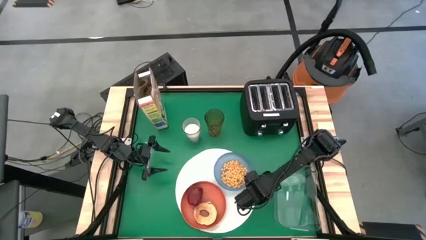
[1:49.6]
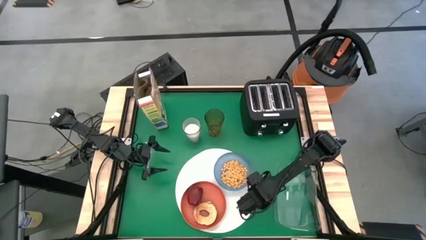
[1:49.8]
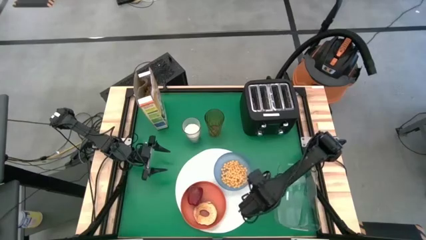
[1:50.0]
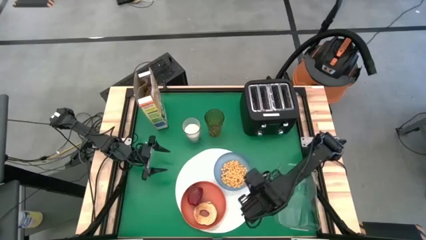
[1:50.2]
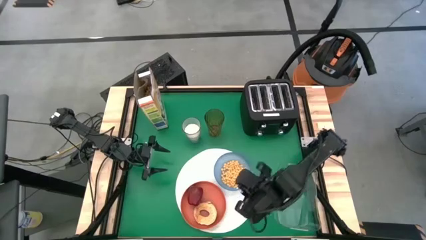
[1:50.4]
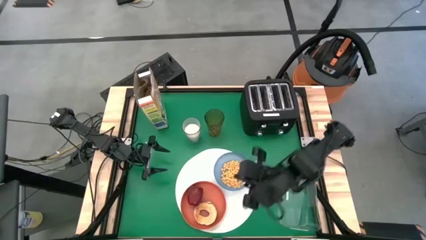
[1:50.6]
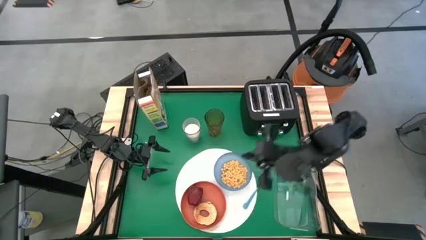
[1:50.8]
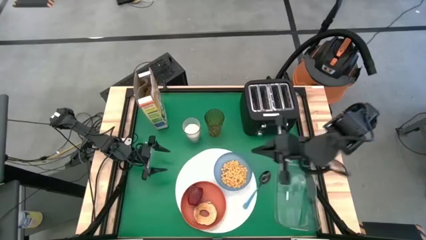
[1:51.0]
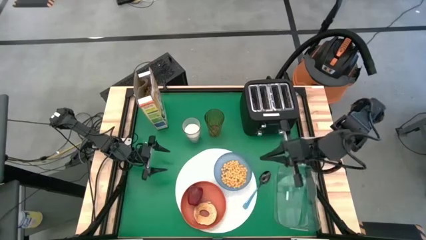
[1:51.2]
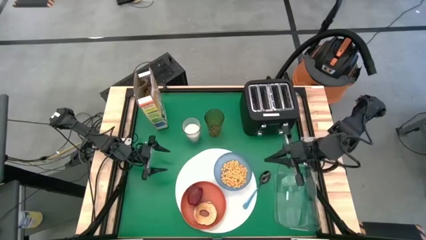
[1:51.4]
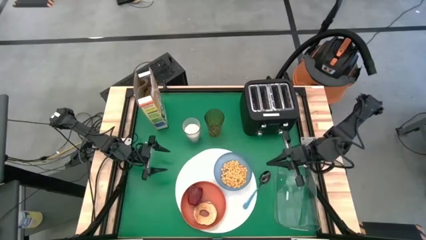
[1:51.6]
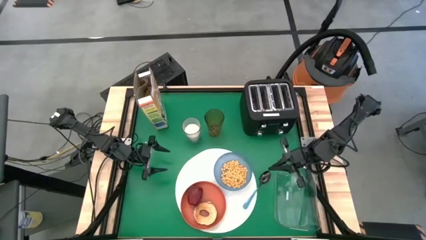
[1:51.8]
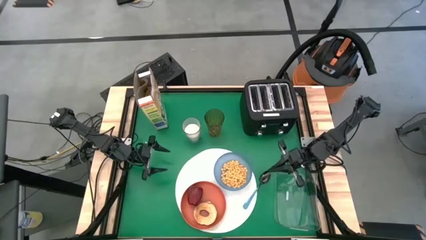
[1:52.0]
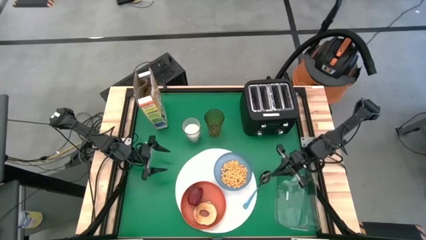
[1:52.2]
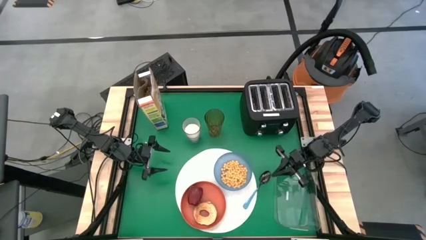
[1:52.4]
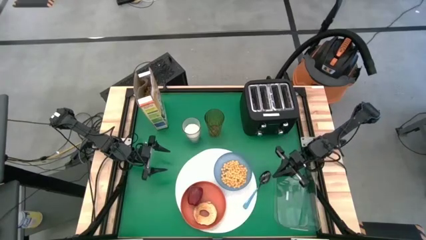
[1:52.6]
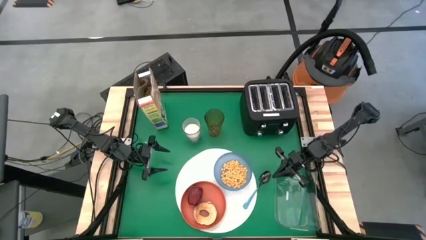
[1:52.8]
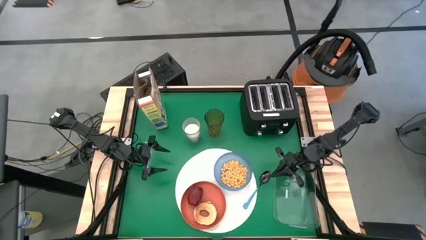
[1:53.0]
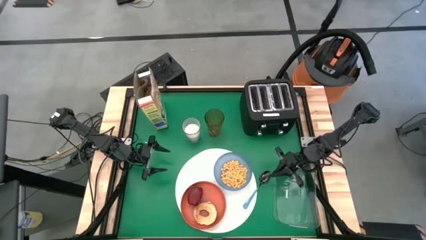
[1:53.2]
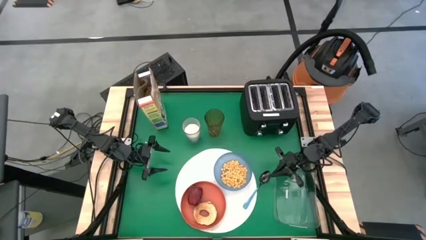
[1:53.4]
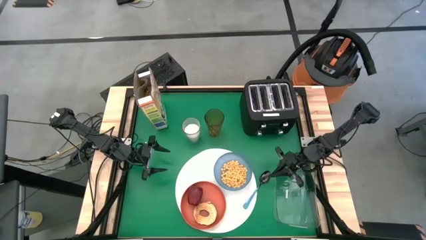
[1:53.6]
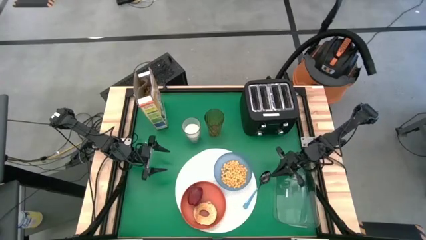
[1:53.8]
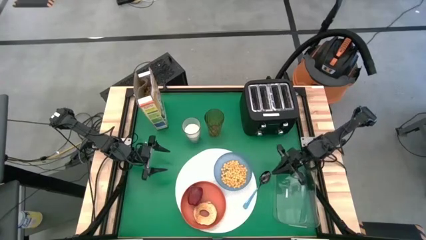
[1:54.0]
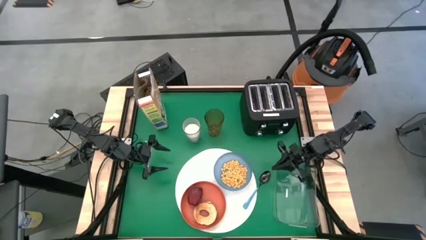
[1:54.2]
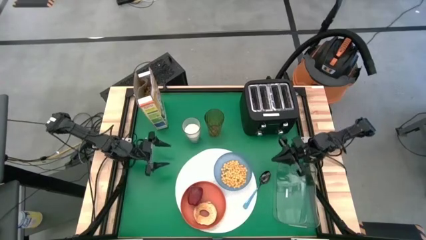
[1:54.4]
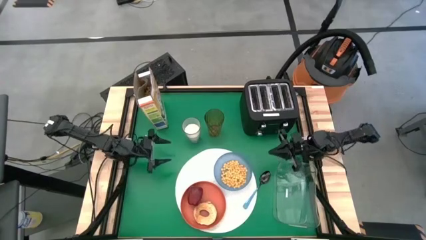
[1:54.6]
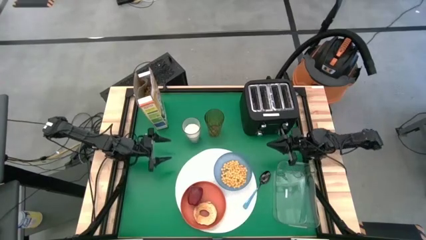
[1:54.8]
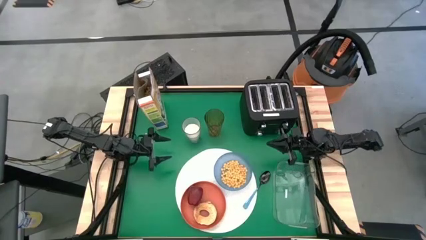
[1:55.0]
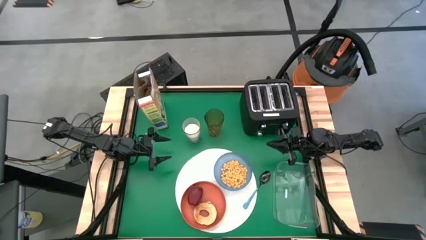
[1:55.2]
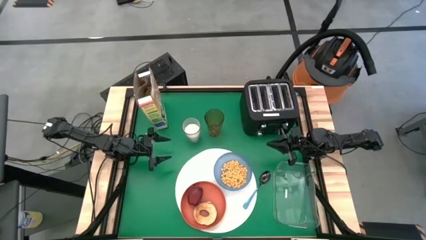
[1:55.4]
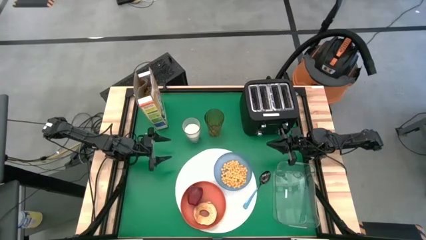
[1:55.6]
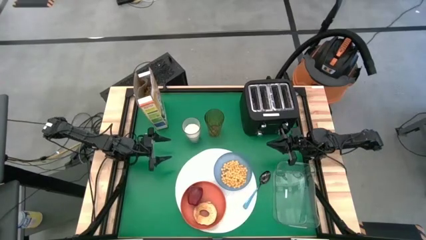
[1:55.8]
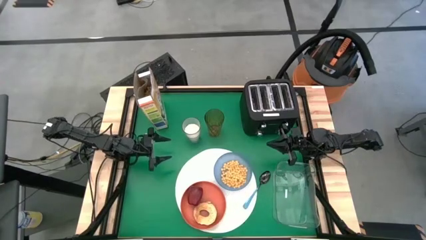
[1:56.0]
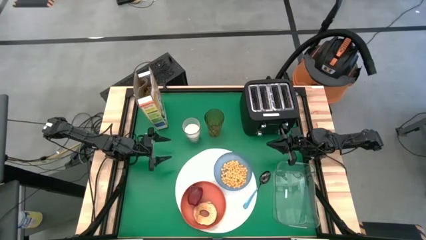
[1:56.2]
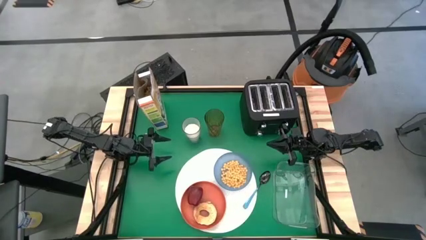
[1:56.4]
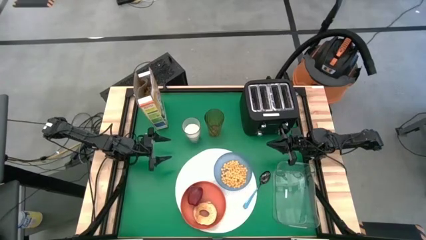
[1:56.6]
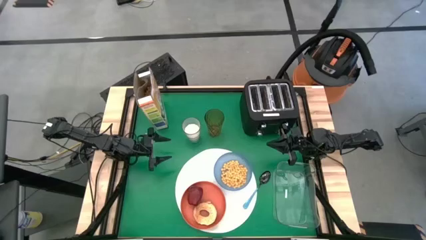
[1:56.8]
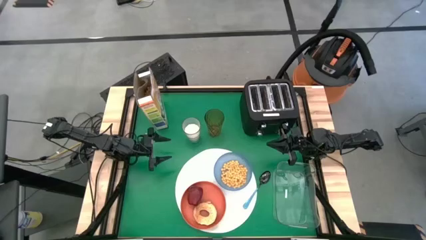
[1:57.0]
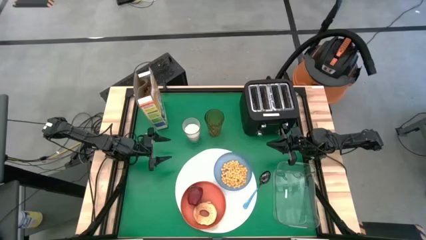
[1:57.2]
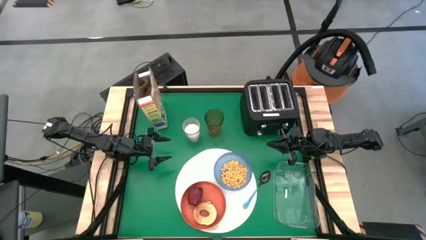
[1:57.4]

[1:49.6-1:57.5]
Task: Arrange a breakfast setting
Return to Home Position
